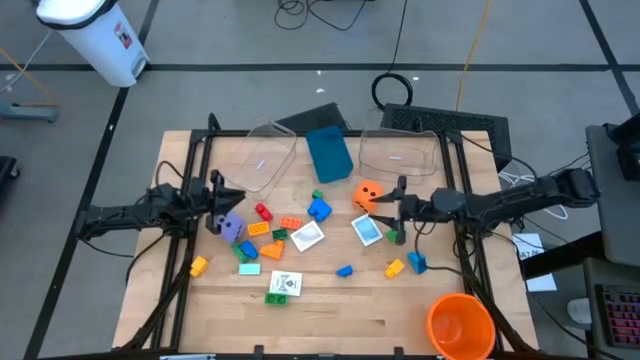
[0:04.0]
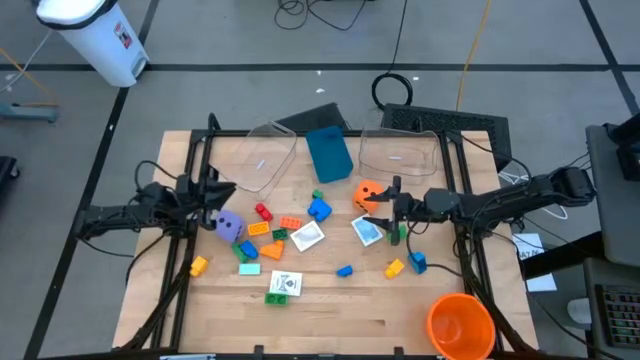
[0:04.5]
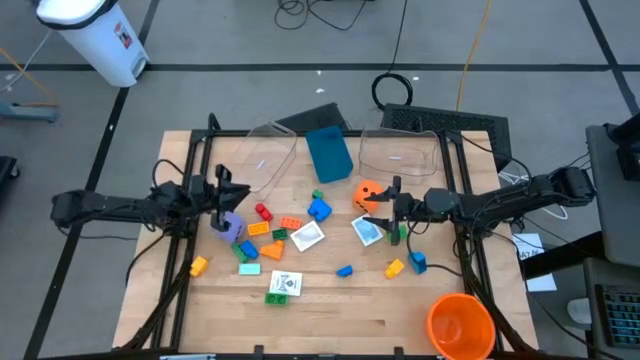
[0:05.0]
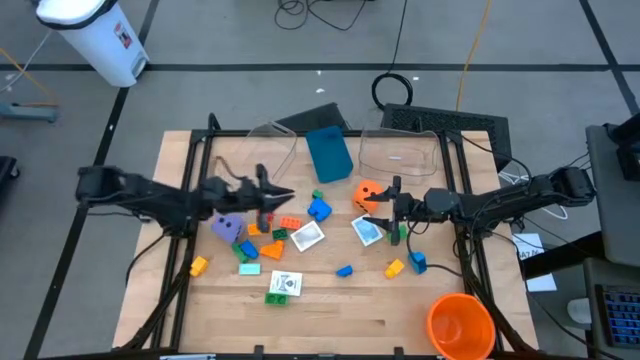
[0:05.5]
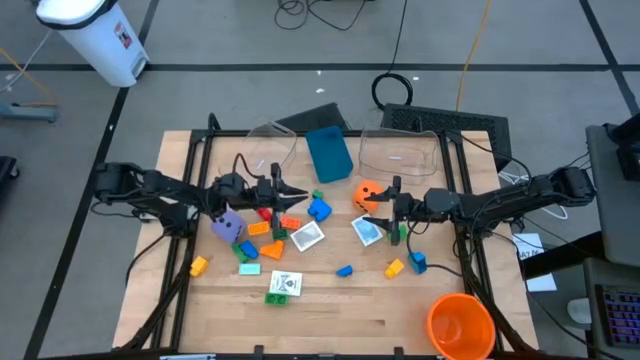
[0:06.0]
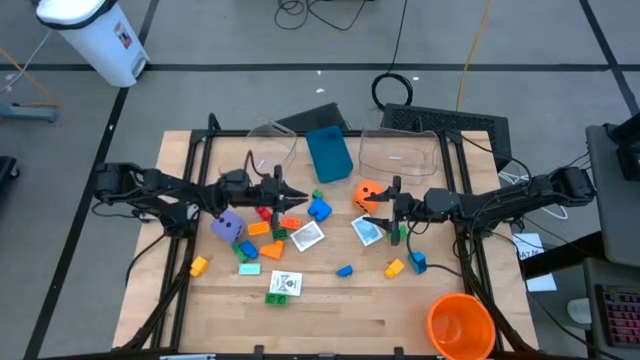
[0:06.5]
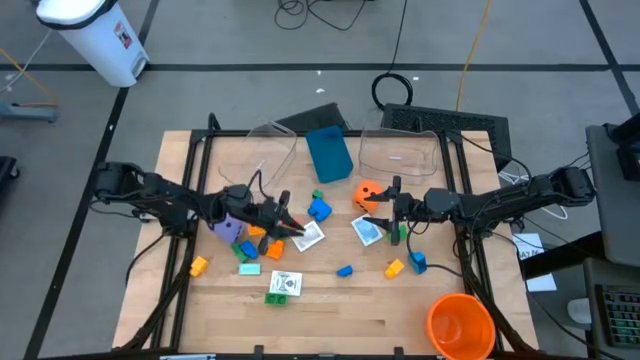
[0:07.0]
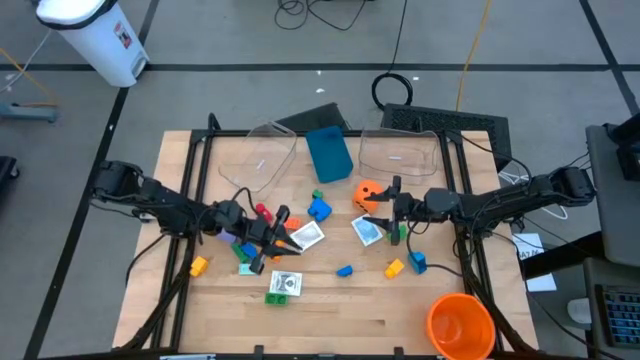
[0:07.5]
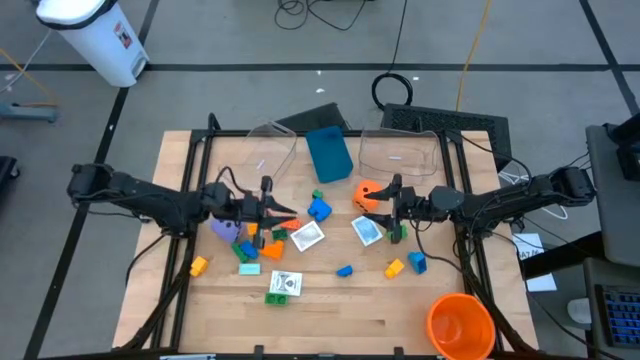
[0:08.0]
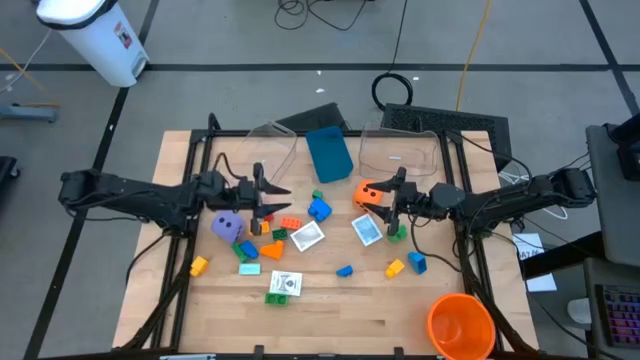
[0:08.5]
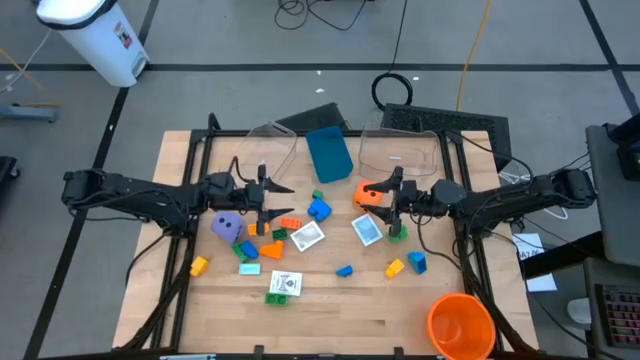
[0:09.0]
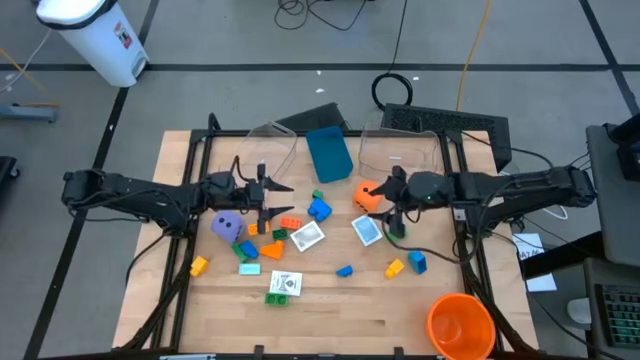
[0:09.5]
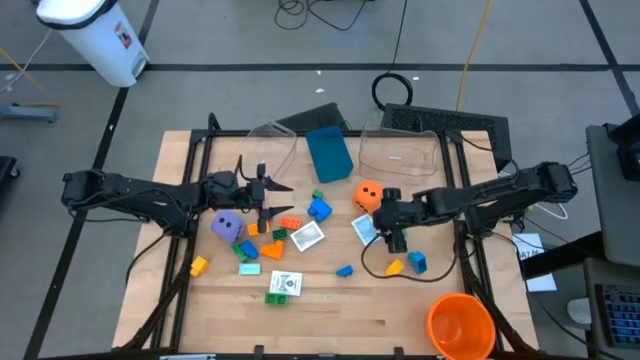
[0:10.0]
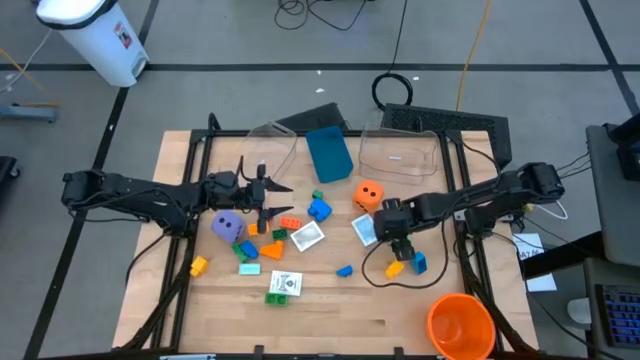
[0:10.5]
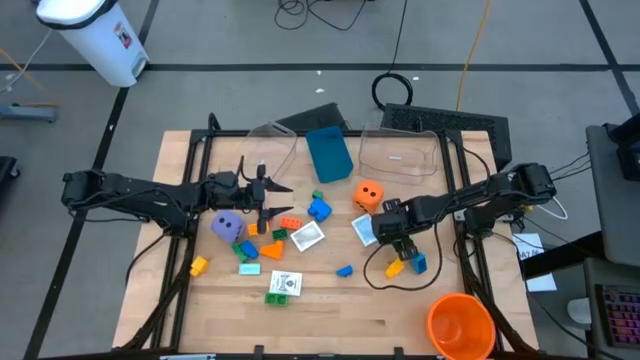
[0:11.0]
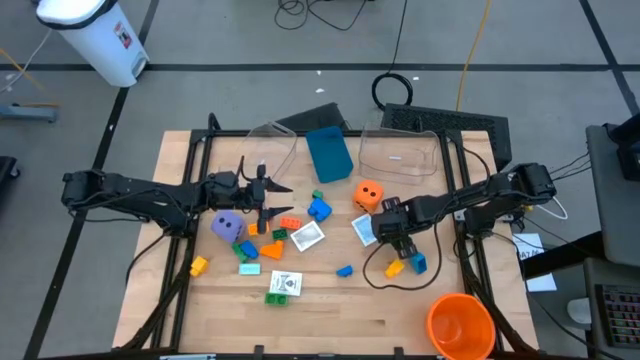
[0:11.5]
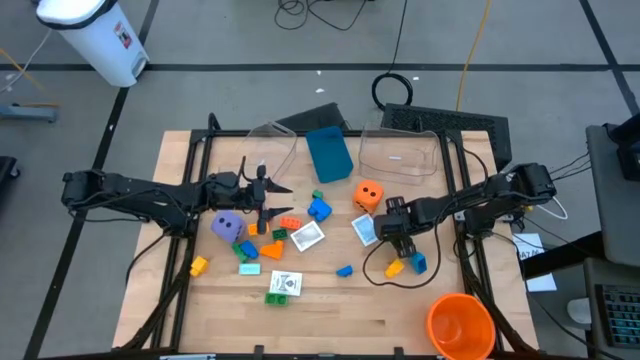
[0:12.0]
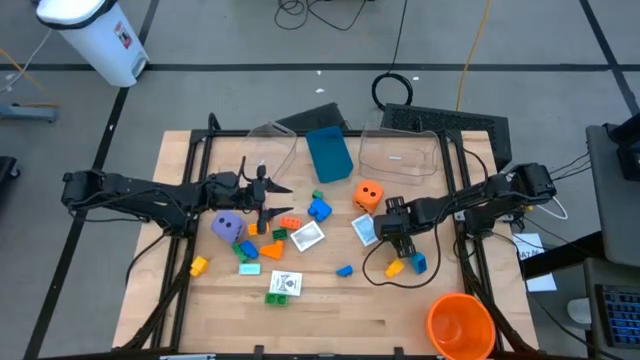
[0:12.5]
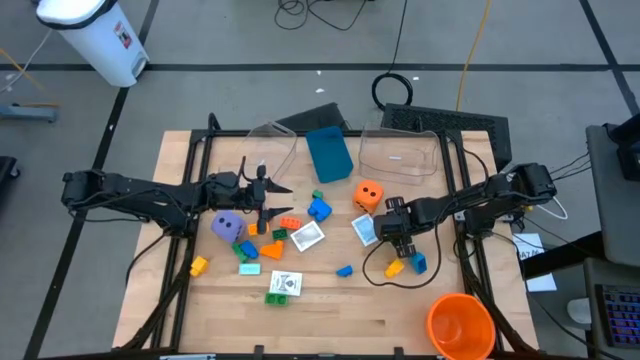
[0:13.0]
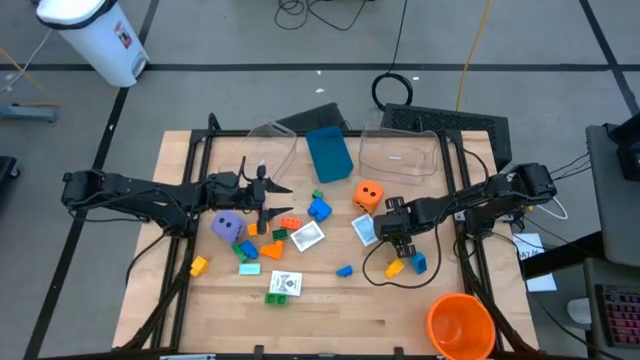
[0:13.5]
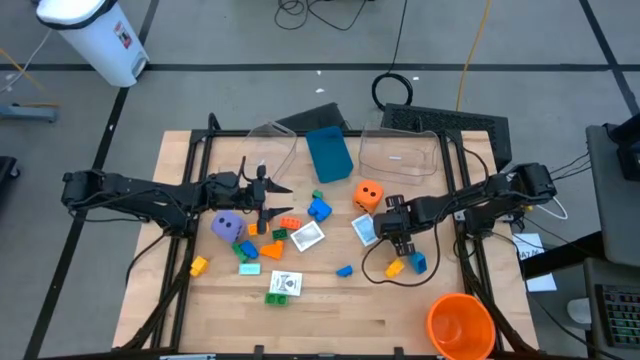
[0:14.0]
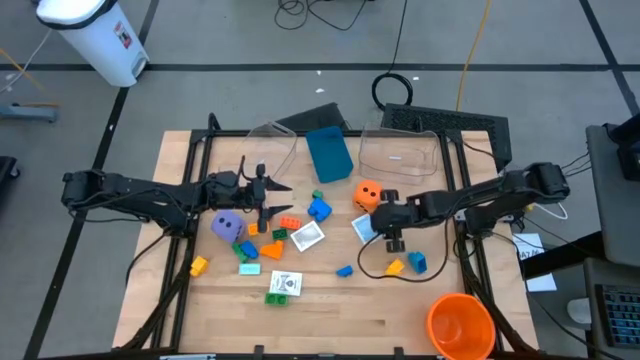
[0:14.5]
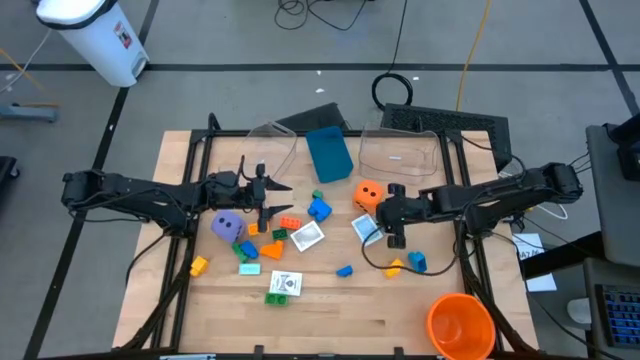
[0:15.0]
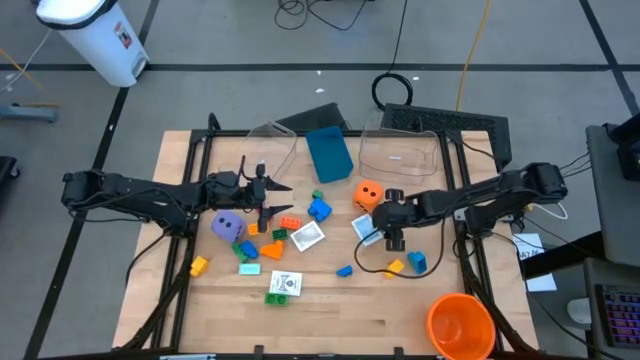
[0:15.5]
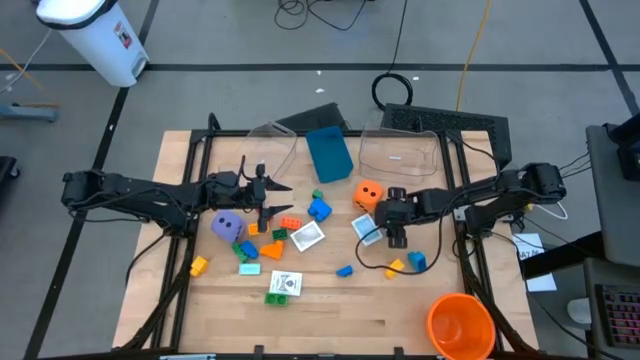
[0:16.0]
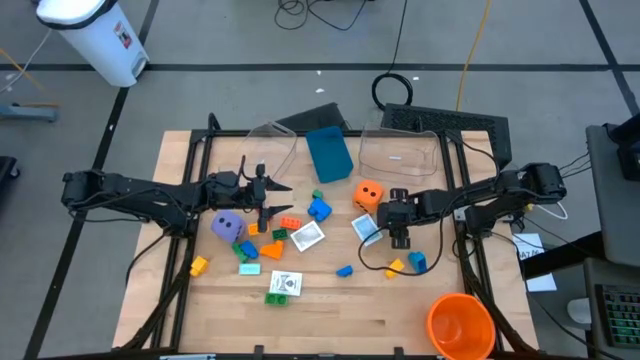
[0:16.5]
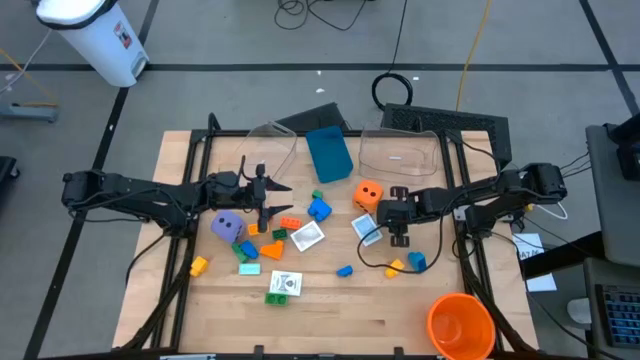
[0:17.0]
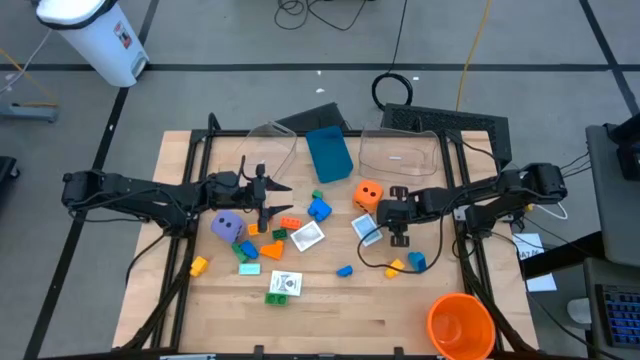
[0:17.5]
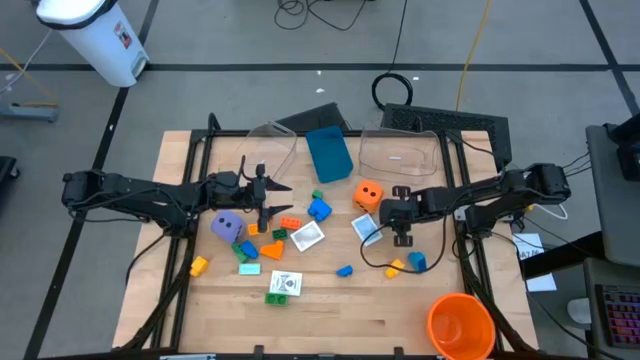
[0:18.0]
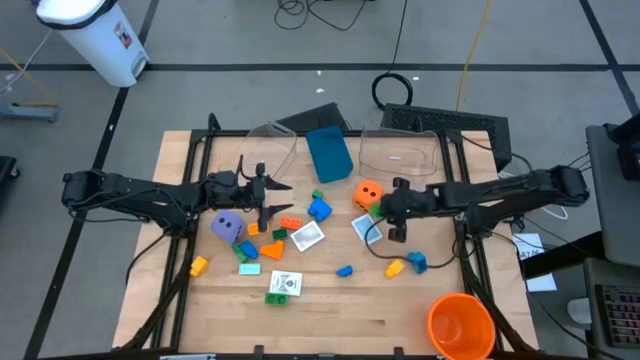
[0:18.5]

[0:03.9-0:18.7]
Task: Pick & Place Toys
Put the green game piece into the left transparent bin

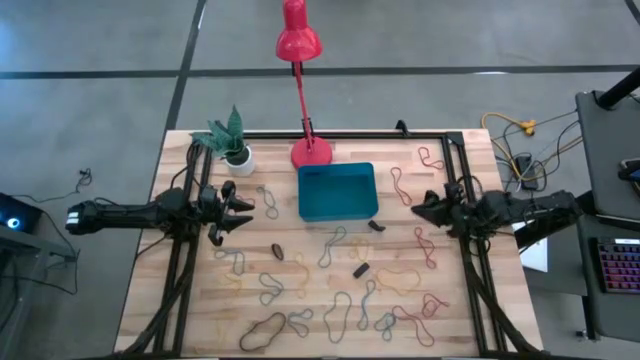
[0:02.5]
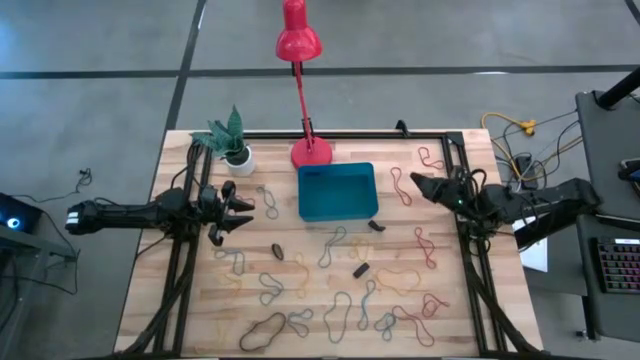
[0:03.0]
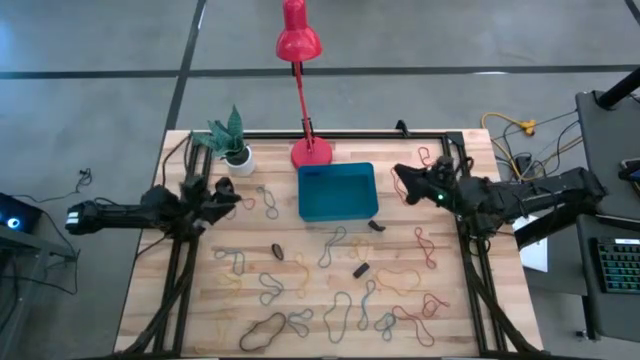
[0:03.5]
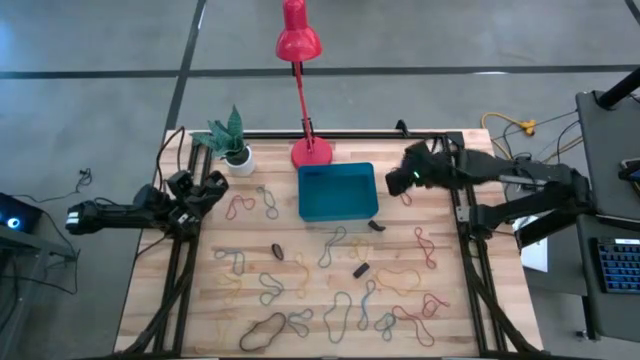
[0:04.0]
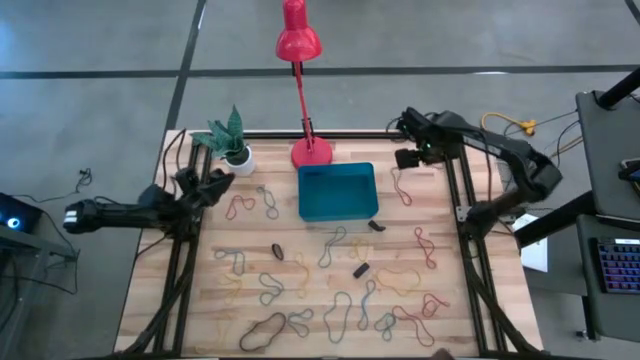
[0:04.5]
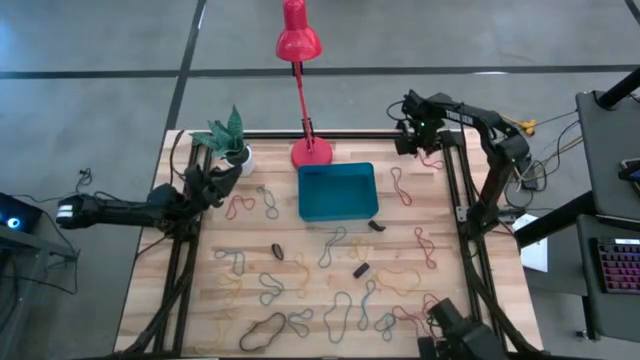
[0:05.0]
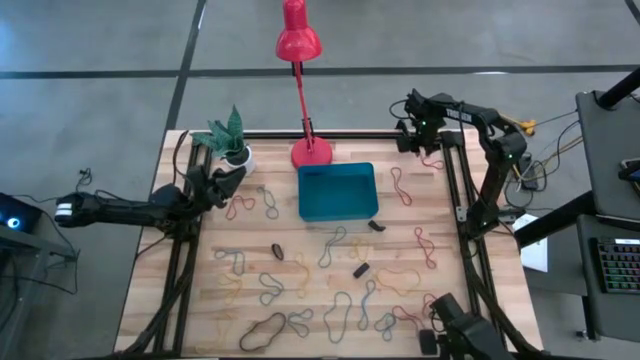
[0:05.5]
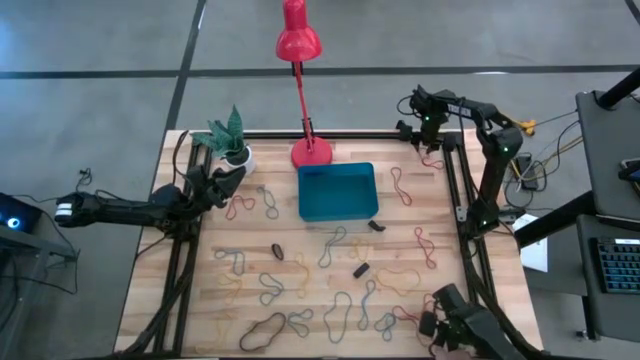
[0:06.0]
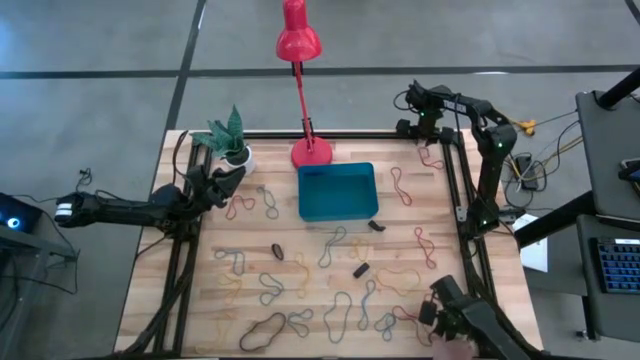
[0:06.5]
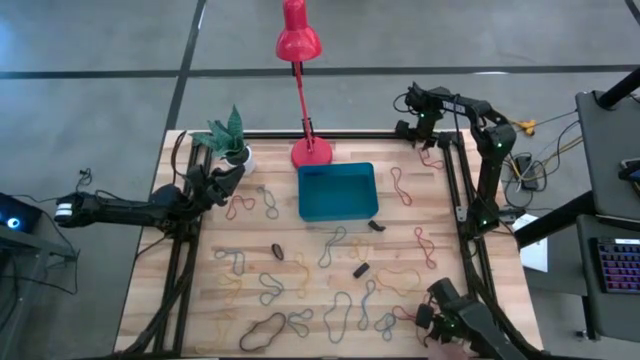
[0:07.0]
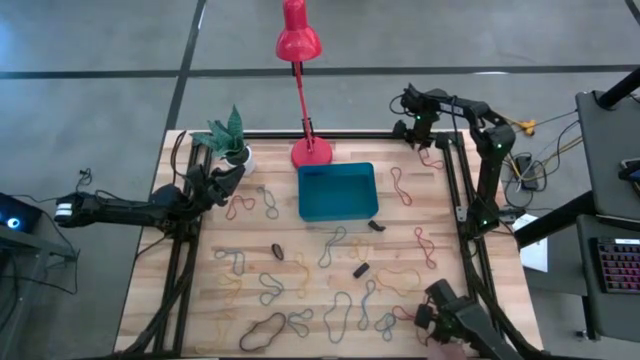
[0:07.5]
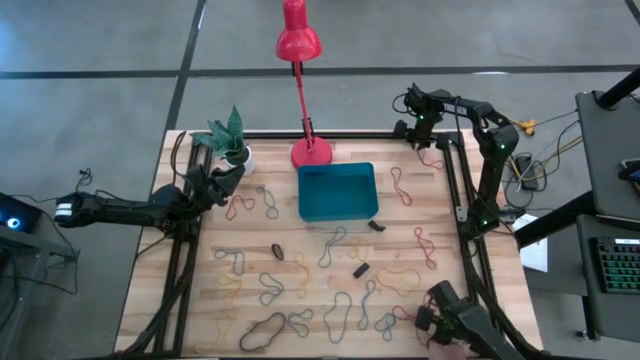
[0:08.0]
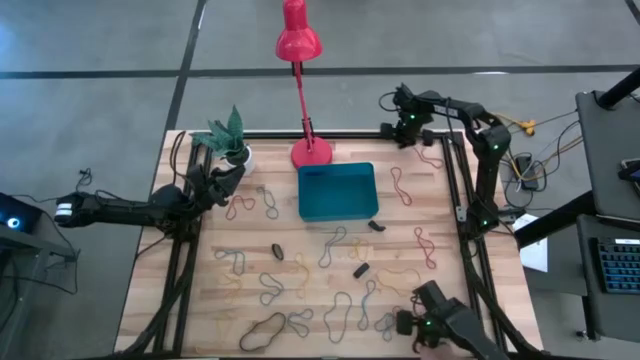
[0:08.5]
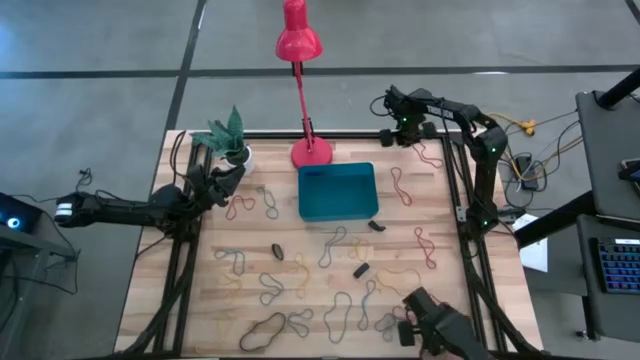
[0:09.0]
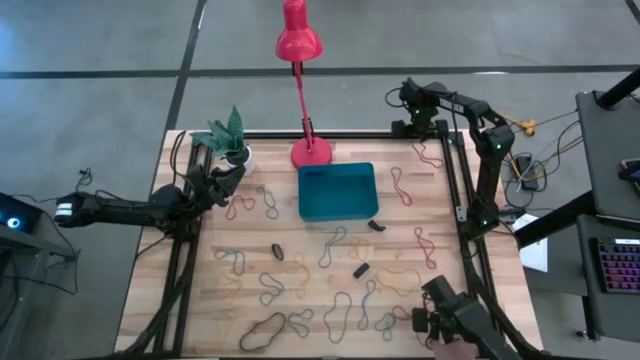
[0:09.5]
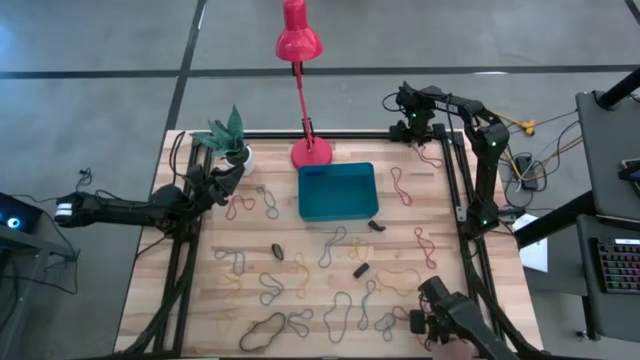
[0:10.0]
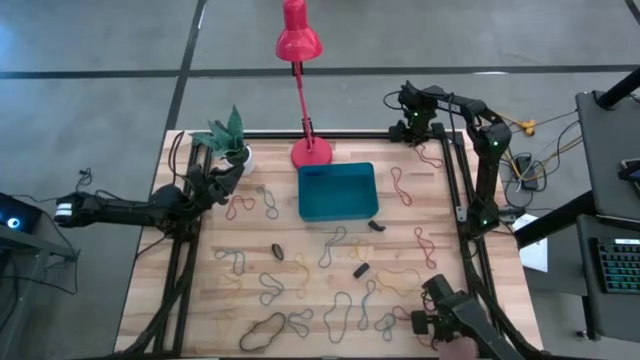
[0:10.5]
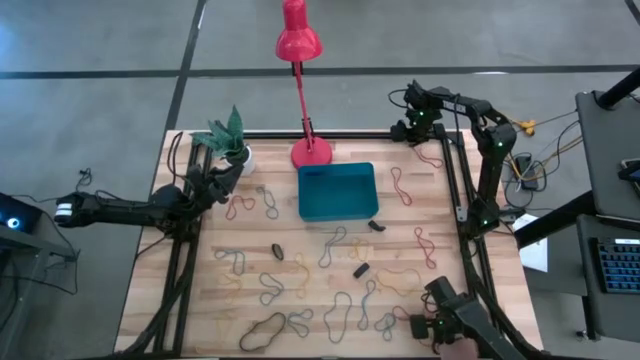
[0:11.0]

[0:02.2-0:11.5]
Task: Pick and place rubber bands into bin
Put the red rubber band into the blue bin
